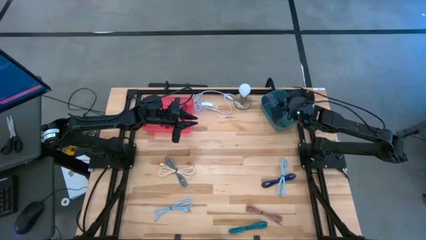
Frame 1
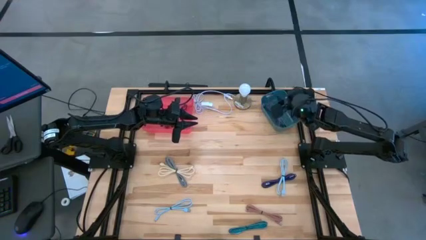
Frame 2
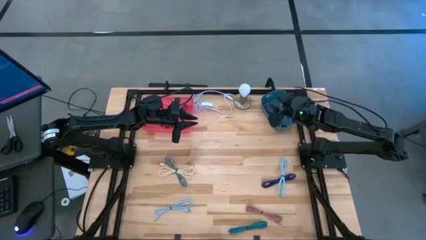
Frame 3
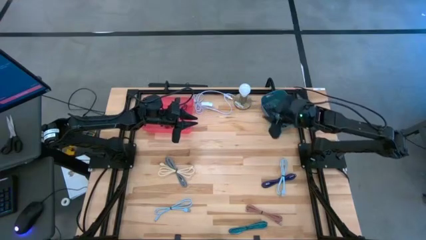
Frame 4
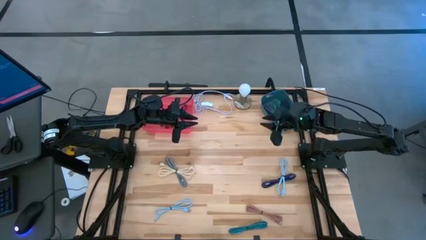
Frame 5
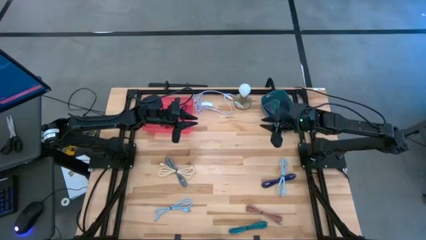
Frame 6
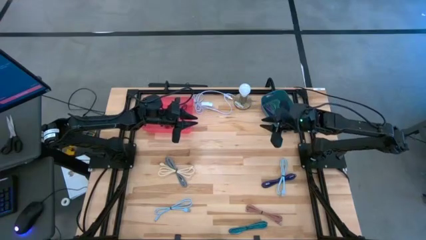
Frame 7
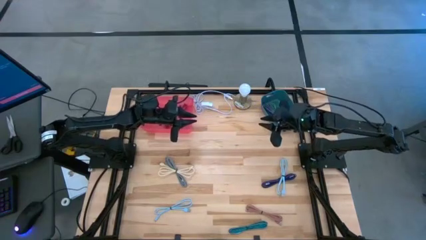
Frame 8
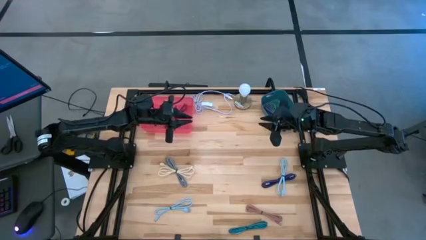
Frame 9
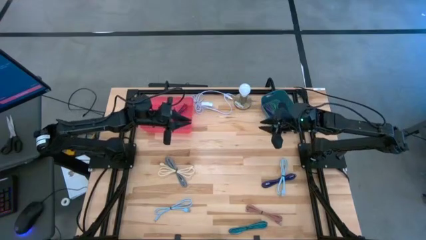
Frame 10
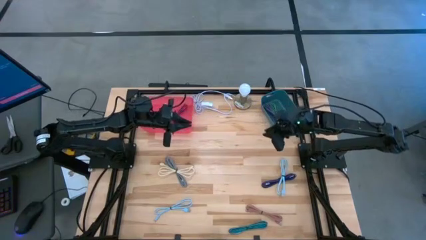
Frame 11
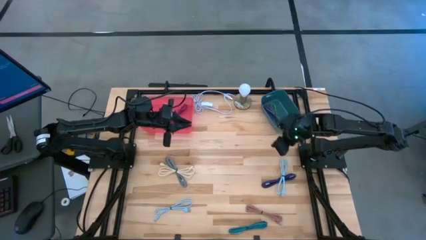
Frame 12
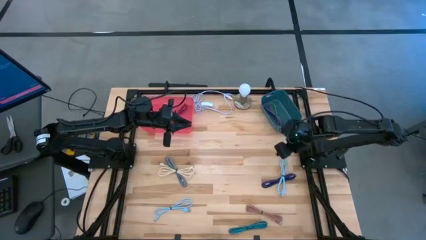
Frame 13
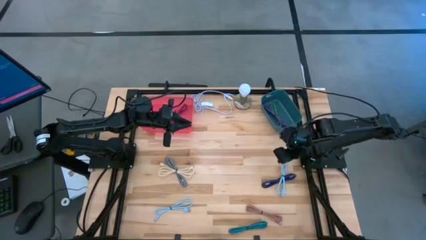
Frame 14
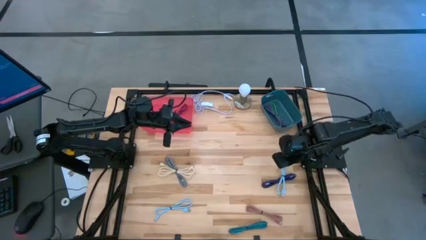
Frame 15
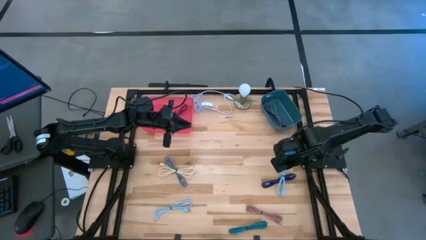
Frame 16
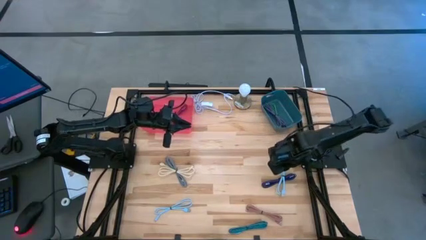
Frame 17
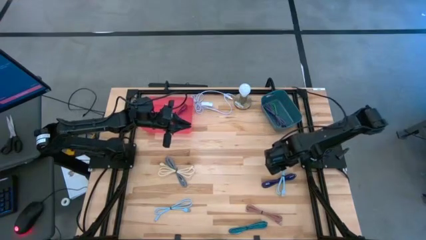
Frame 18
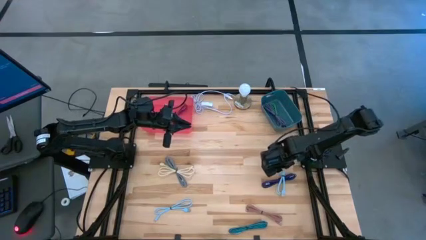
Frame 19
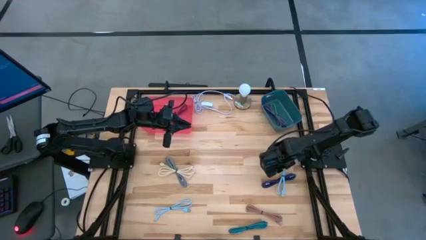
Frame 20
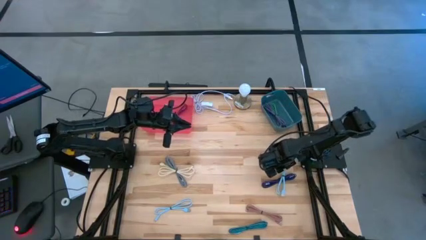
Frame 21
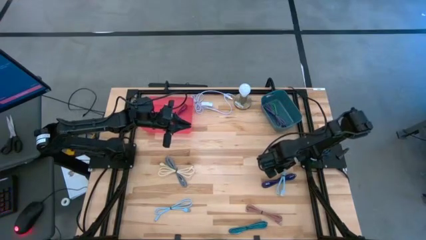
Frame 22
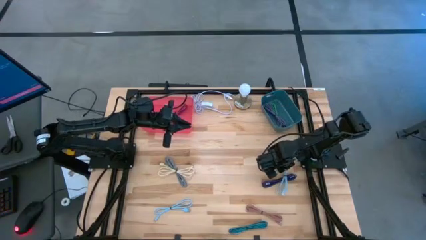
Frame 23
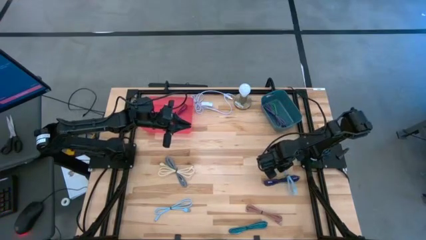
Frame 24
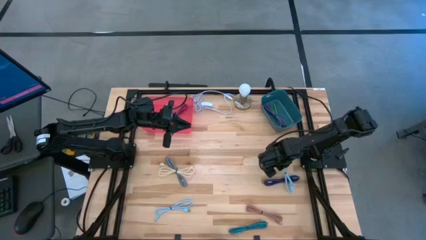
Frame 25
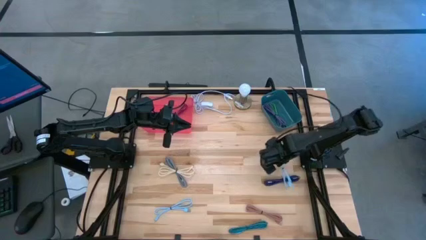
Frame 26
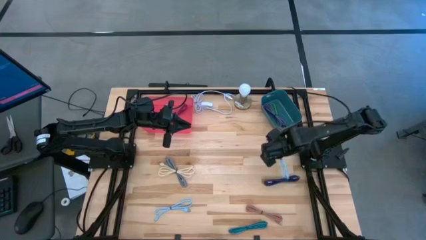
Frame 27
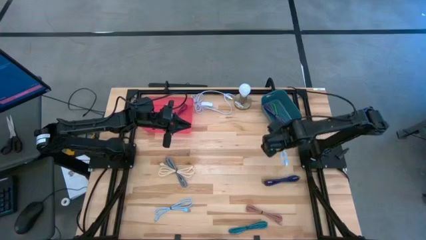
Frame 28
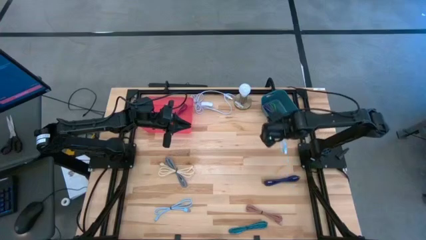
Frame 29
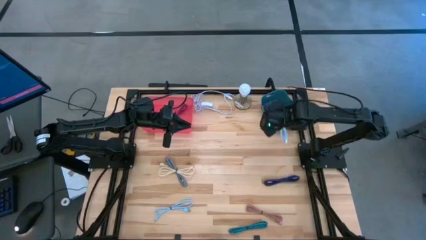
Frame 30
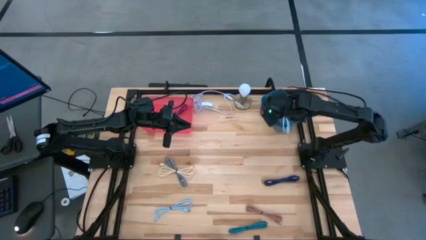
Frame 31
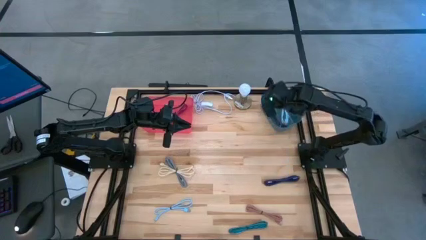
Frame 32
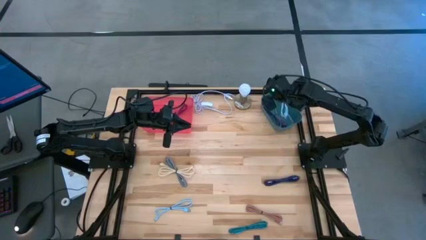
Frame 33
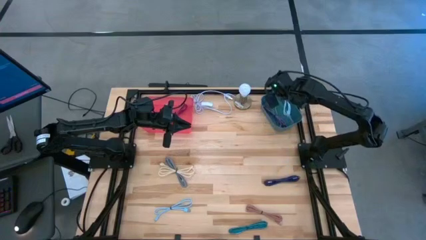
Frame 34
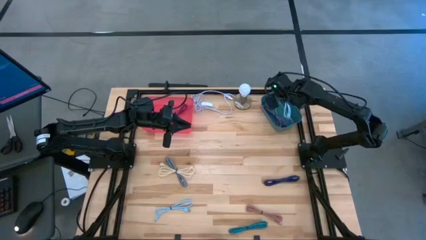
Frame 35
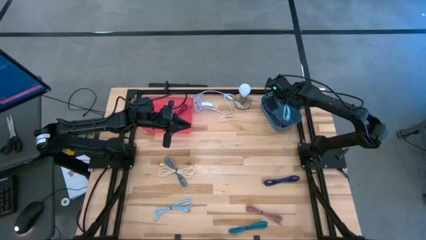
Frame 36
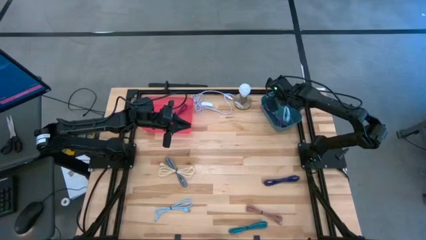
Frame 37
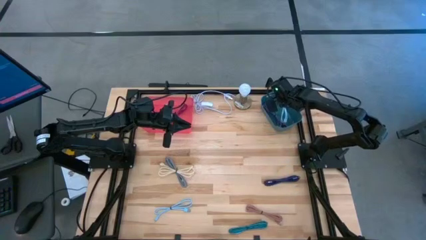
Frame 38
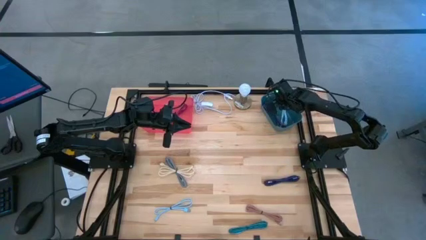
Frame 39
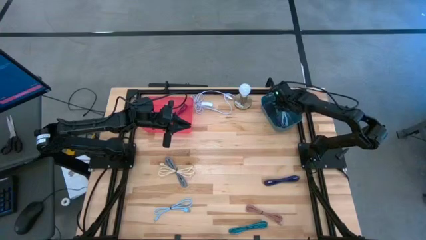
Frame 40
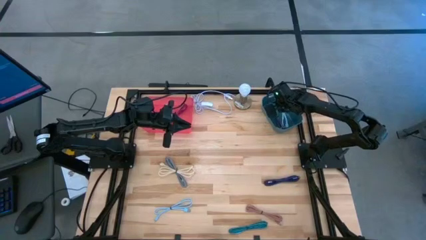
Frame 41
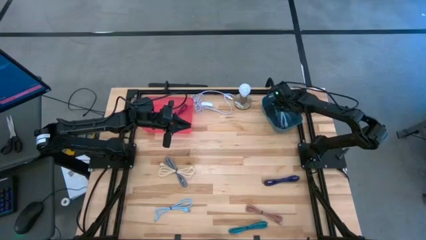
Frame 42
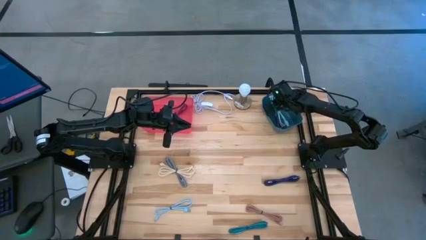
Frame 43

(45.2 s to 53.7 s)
Task: Pick & Place USB Port
Put the right light blue charger cable into the blue bin

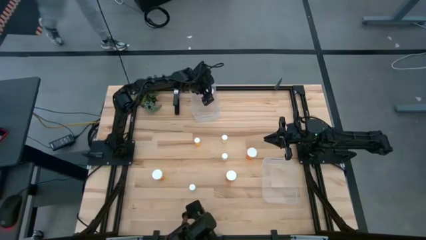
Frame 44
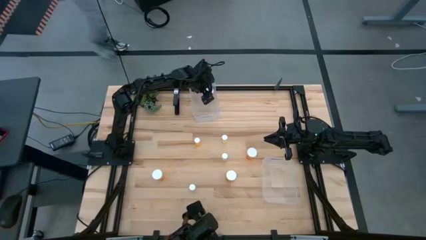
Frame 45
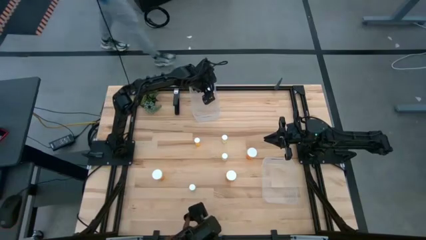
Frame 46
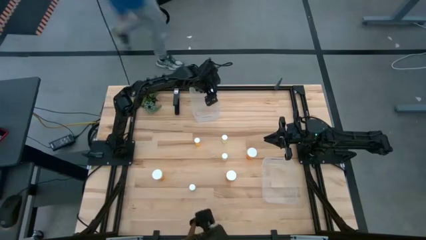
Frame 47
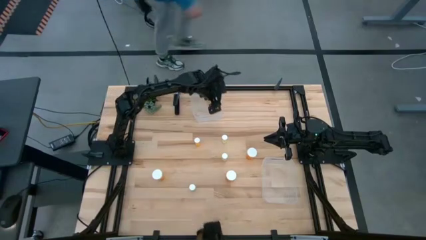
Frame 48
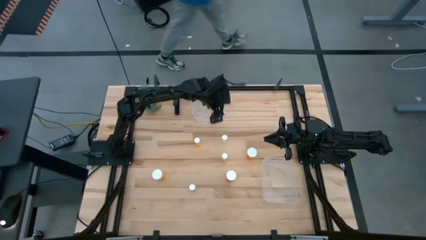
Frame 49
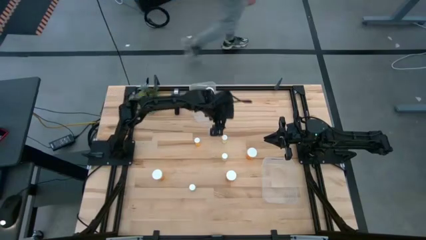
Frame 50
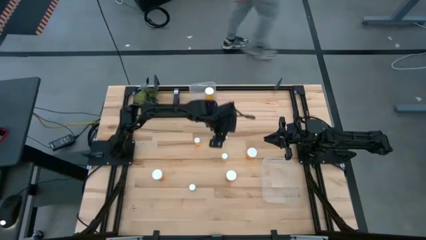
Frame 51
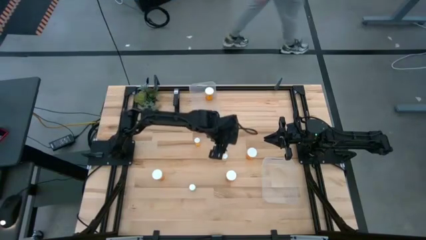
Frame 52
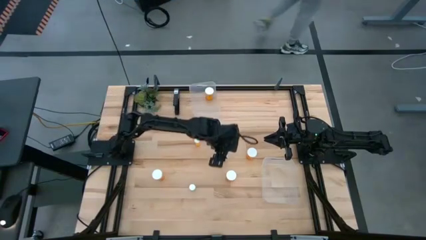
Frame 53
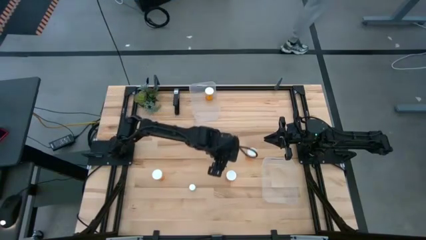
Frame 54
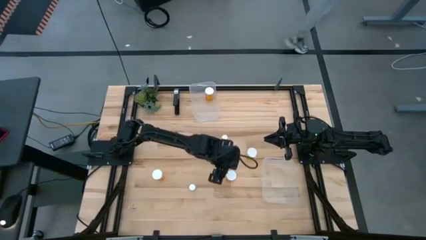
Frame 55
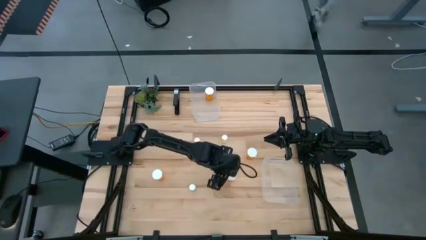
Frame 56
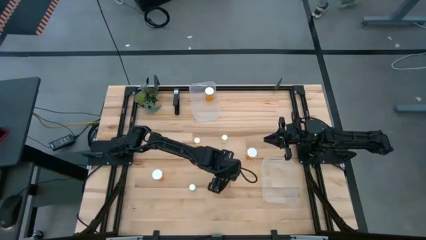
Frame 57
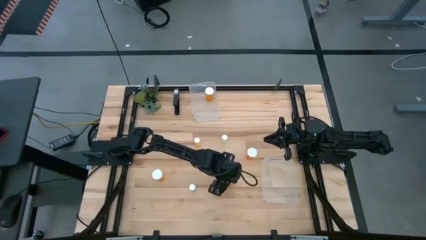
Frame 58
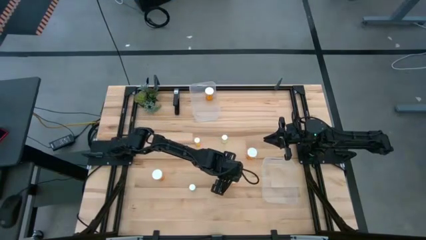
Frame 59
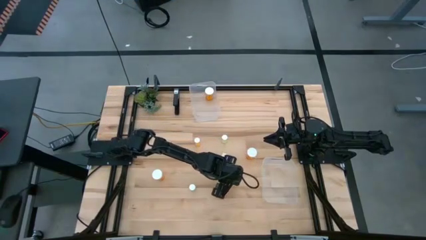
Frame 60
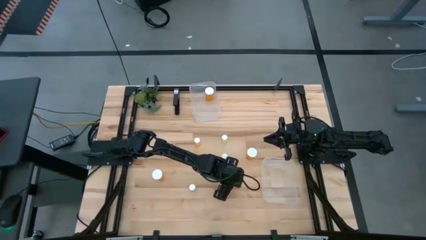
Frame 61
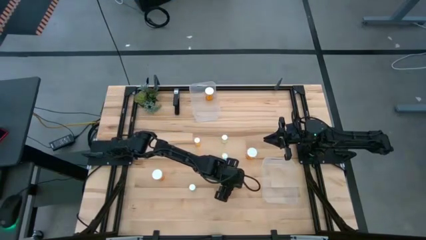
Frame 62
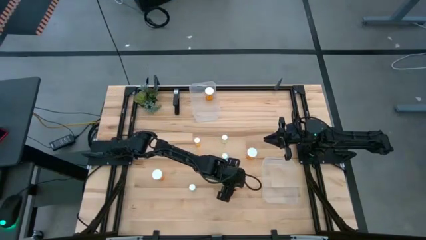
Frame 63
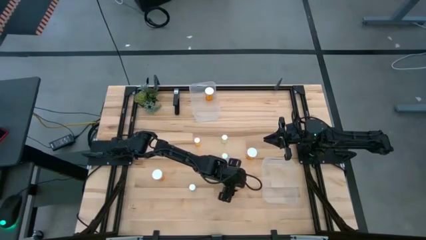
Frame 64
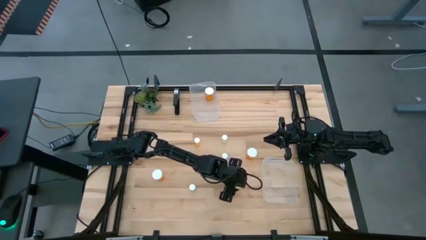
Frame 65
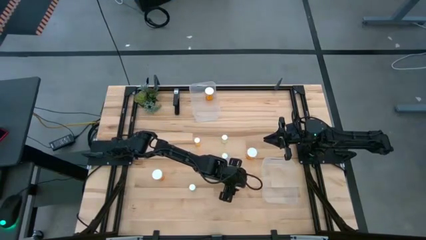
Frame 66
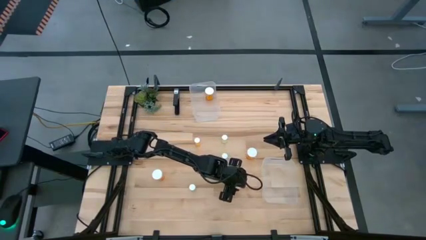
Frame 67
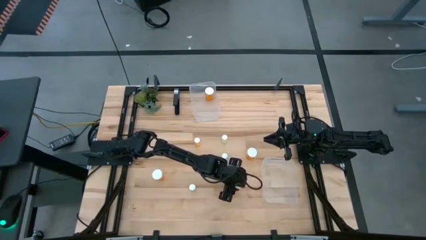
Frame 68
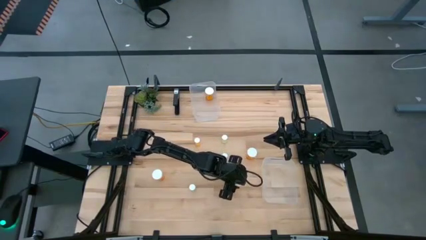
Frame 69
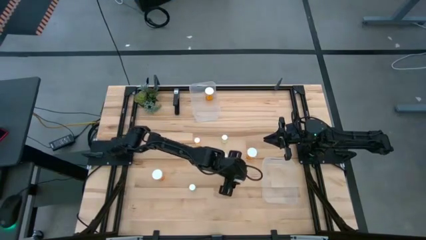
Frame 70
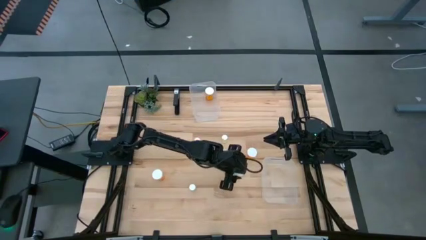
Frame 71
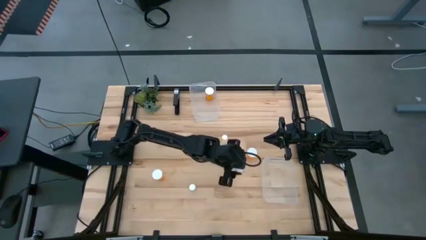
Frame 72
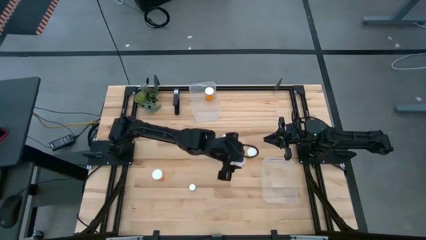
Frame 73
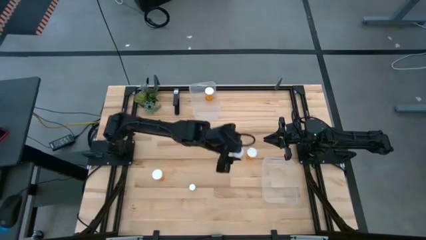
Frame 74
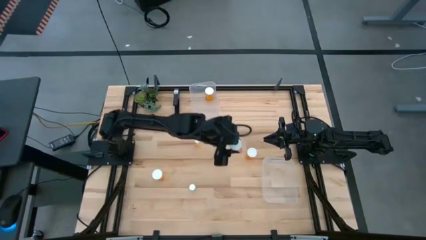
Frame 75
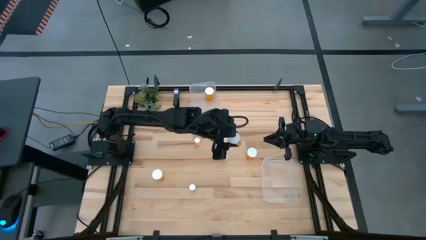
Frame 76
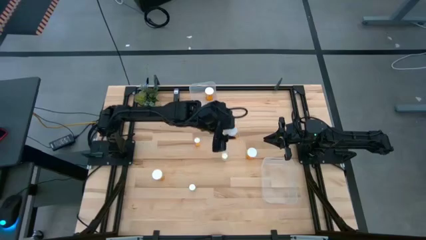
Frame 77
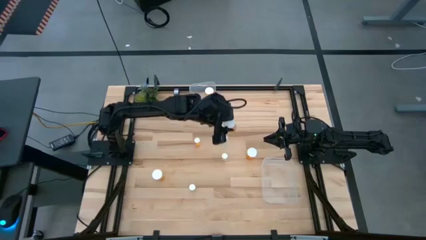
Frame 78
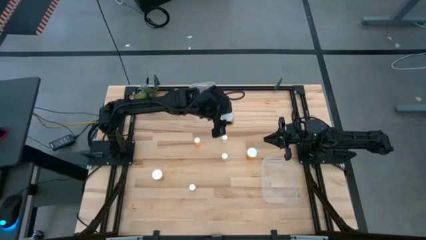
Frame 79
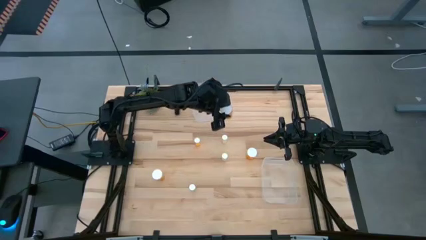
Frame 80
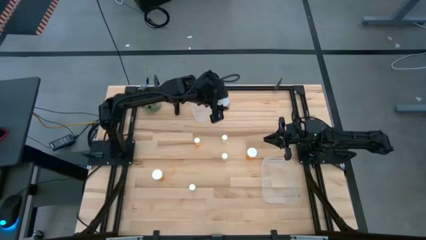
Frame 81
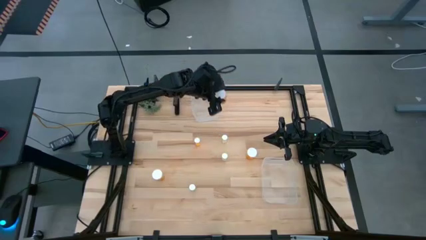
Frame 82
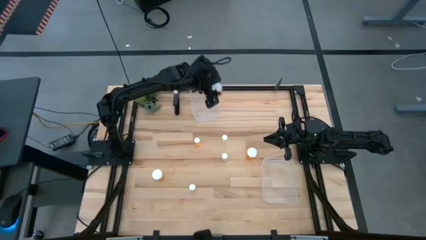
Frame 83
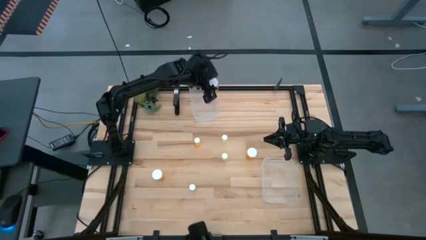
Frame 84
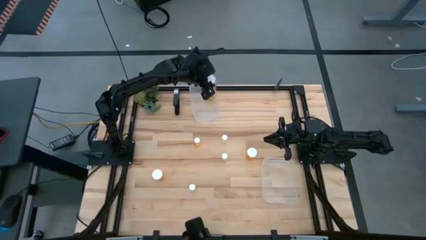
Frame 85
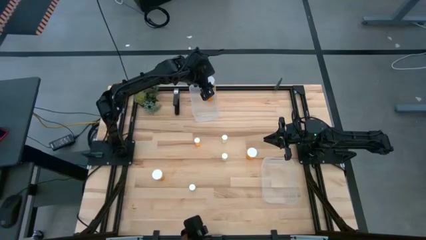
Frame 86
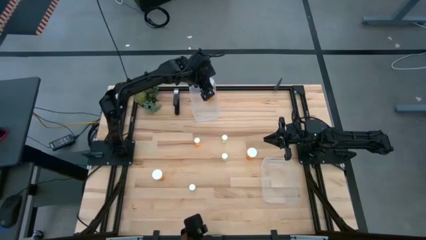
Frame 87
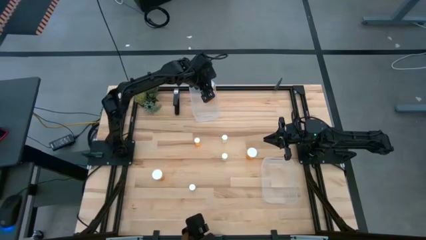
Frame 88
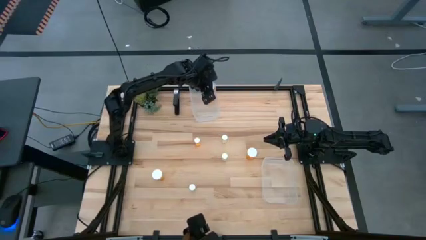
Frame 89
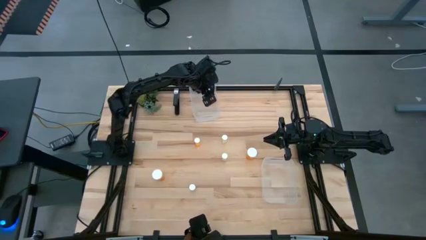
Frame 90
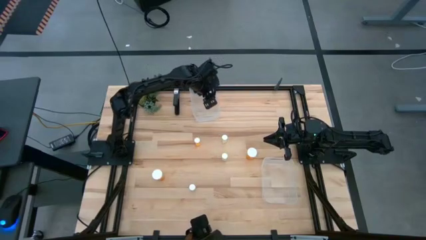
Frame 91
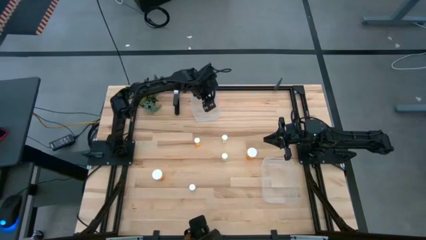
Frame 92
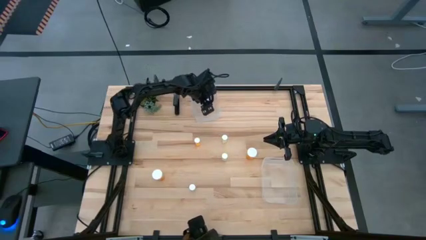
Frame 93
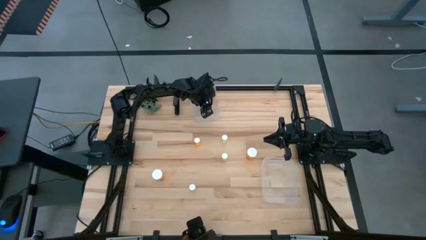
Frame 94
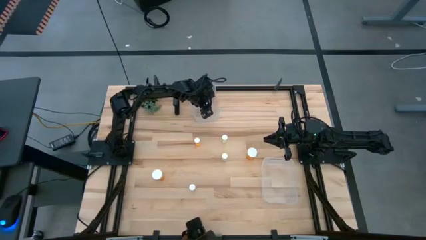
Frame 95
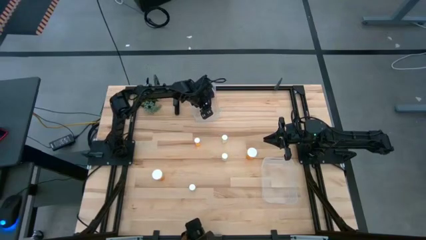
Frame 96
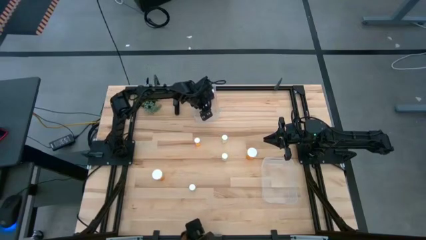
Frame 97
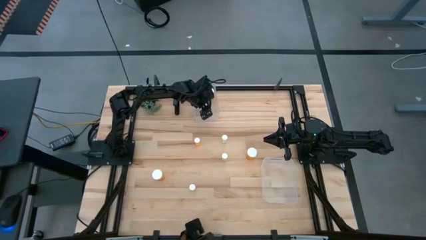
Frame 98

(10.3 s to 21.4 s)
Task: Pick and place medicine bottles into bin by pill shape (circle, oval)
Put the orange capsule bottle into the top transparent bin
